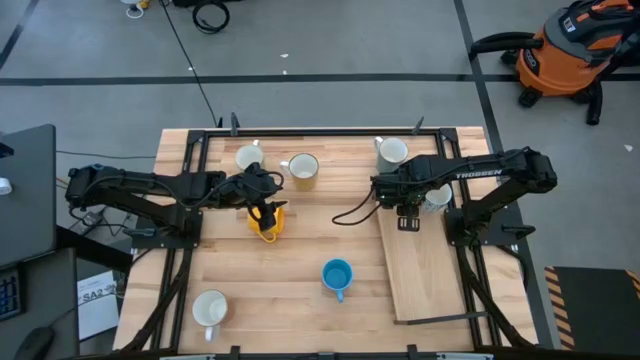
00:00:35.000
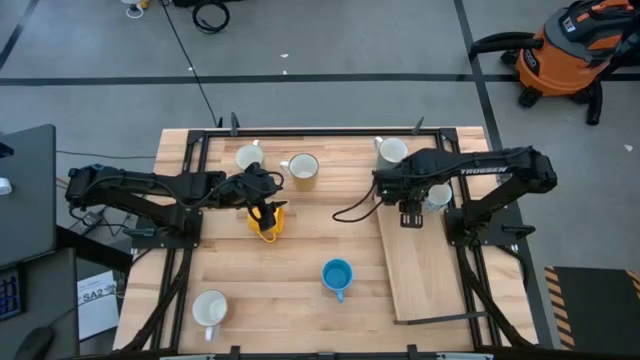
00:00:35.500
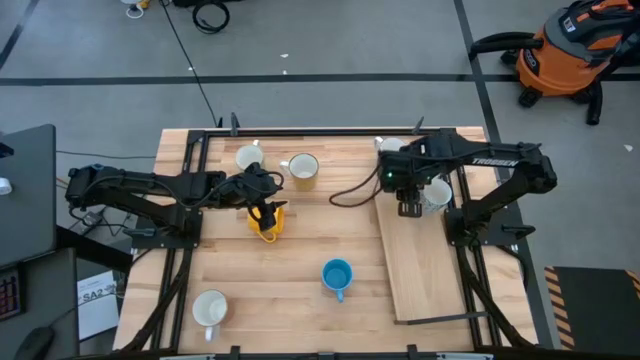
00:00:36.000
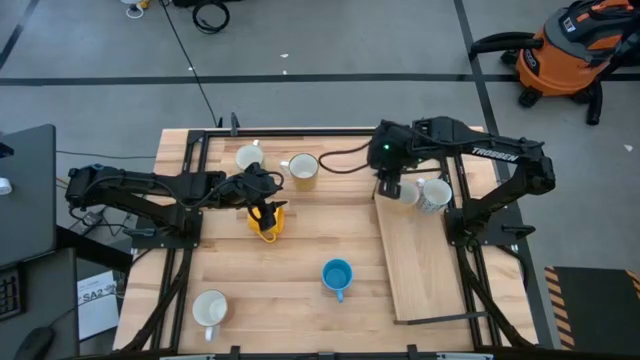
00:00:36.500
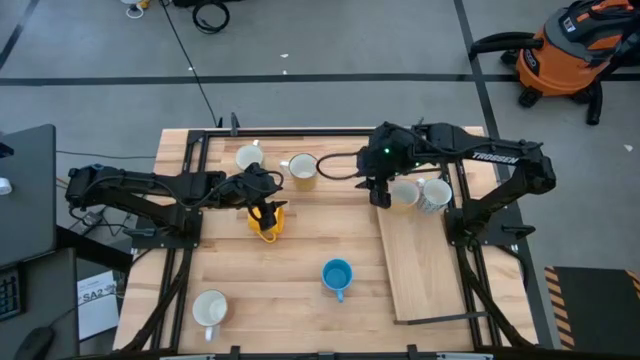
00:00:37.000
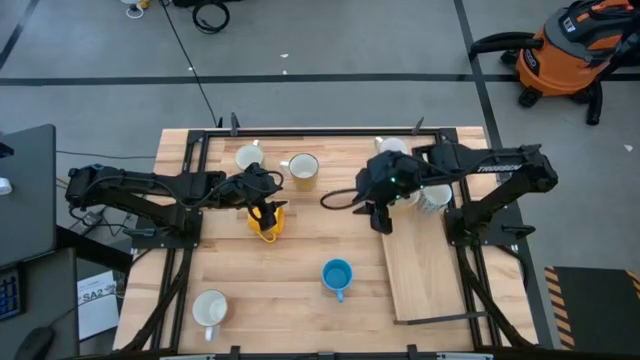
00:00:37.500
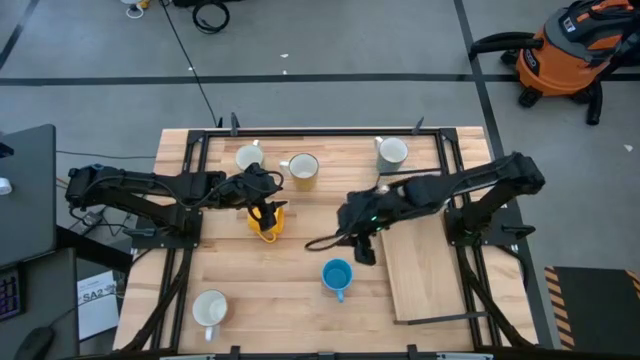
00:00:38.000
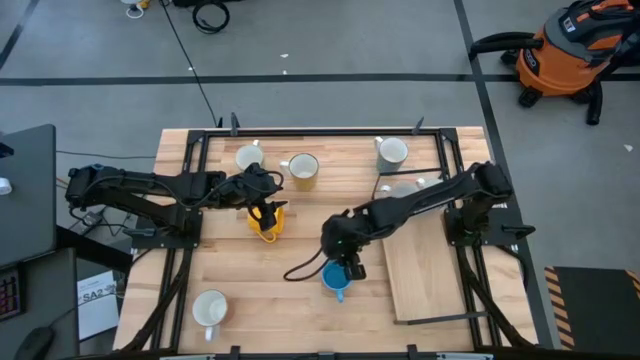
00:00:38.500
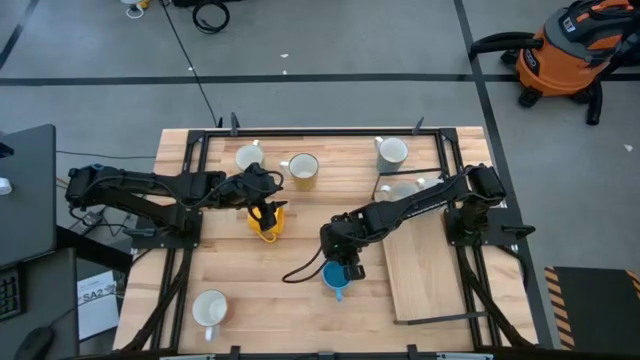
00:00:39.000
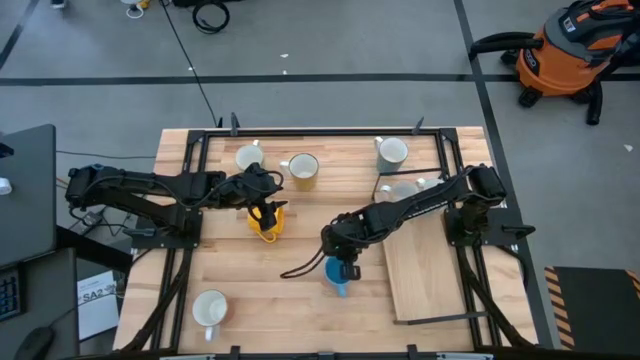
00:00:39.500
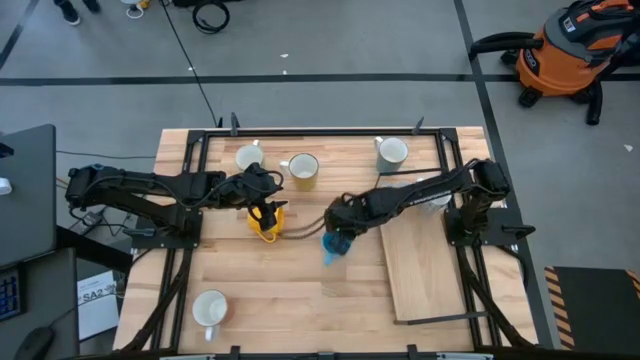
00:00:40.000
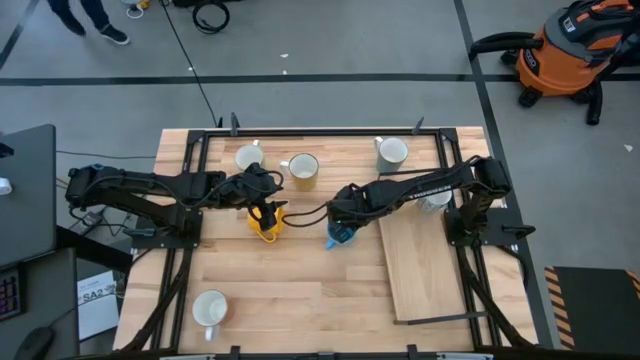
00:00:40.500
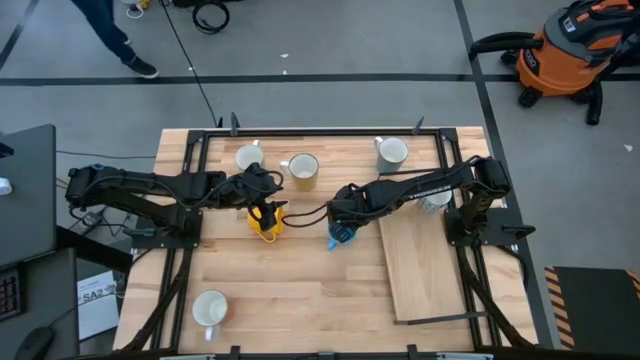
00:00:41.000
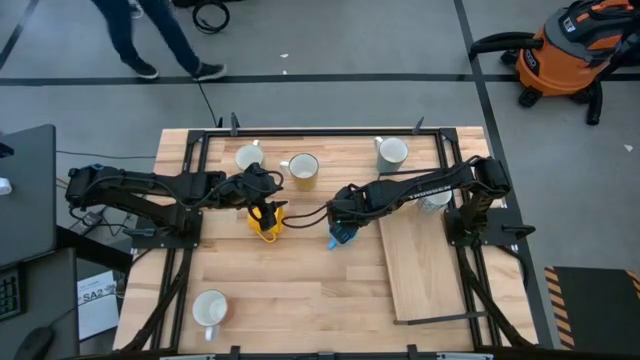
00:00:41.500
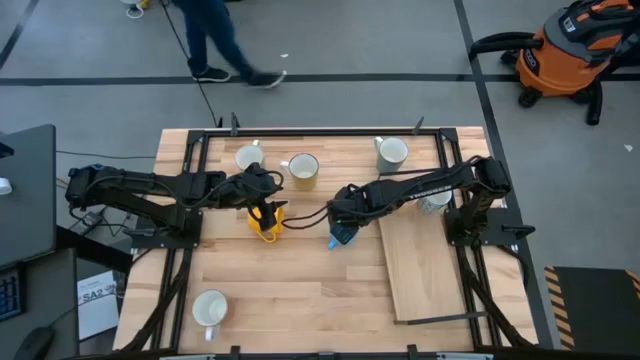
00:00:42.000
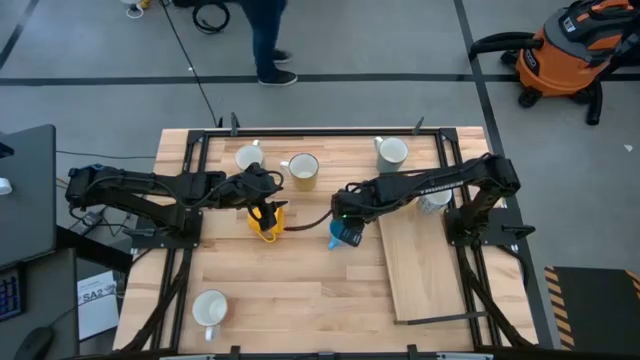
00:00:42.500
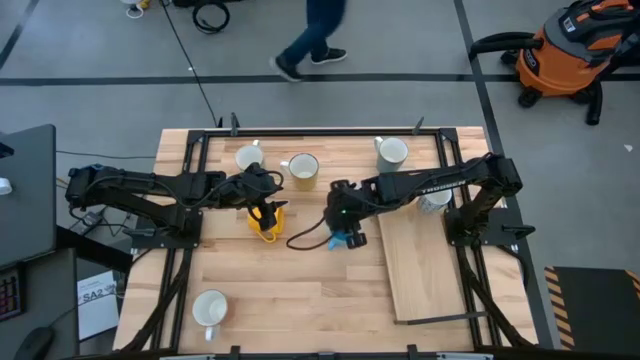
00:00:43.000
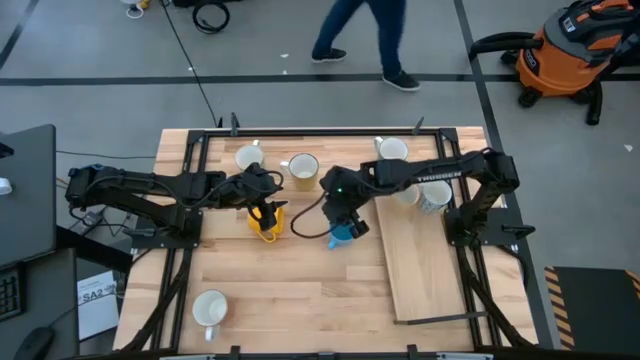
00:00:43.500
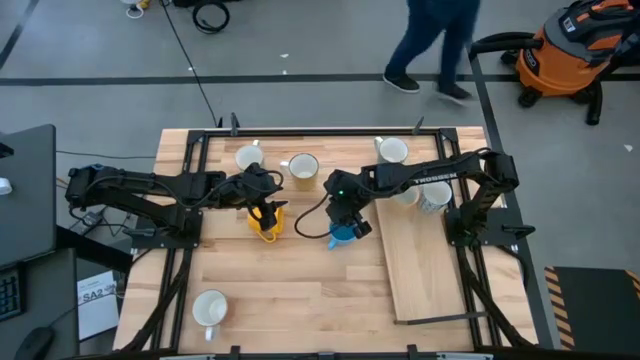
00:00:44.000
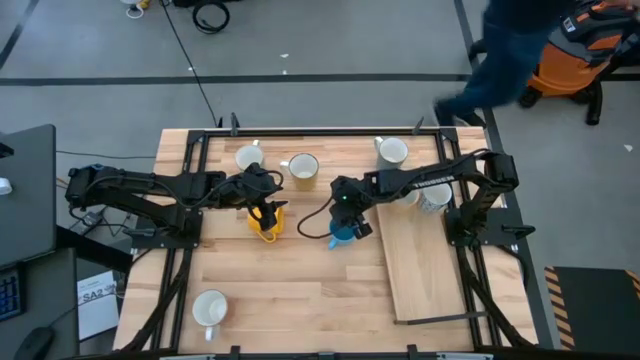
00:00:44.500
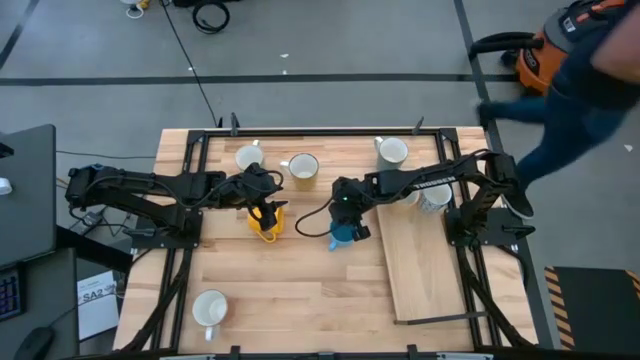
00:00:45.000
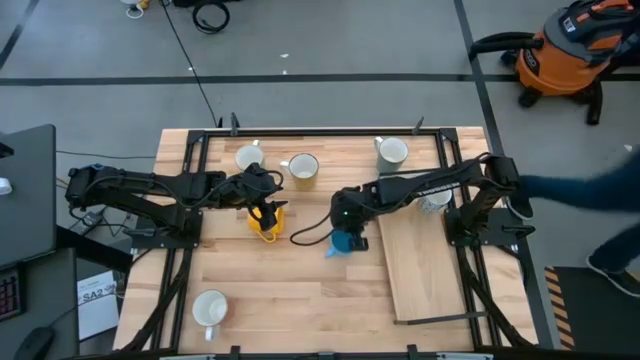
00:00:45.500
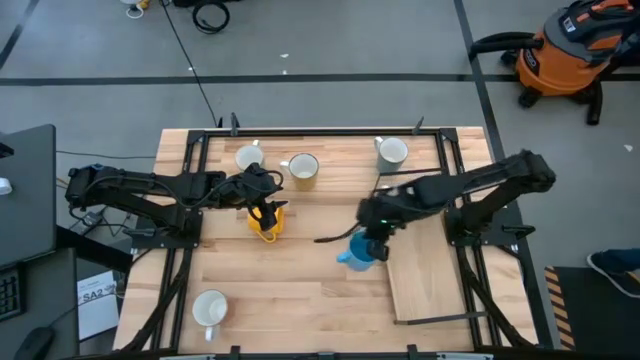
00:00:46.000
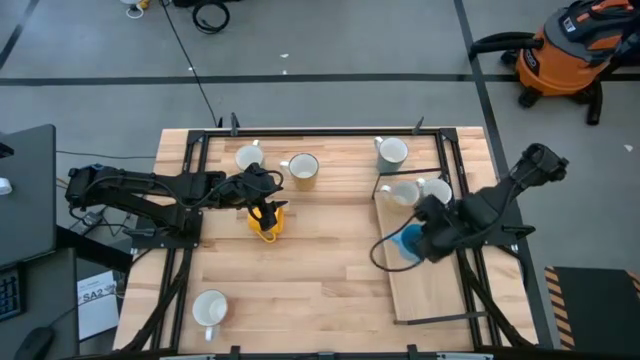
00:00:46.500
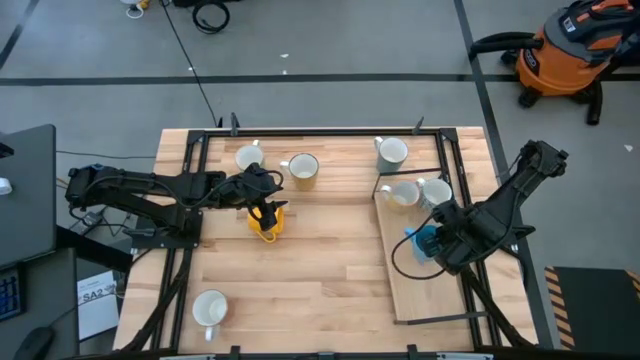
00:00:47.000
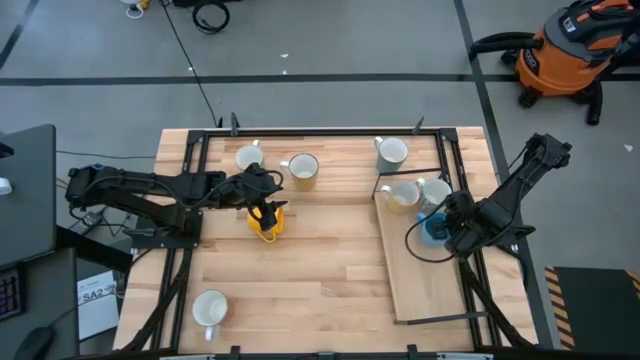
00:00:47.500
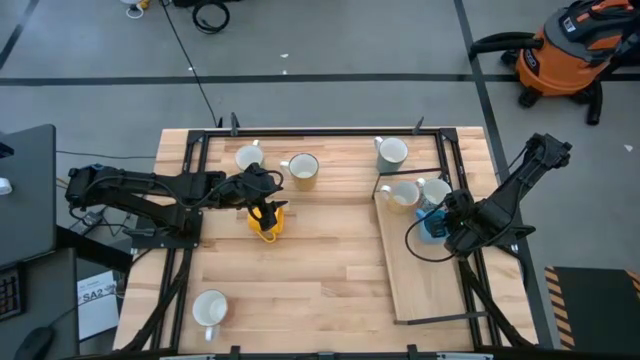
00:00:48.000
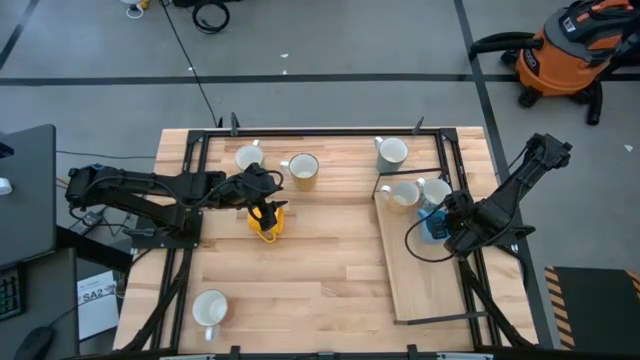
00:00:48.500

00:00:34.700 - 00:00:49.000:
Task: Place coffee mugs
Put the light blue mug on the shelf
